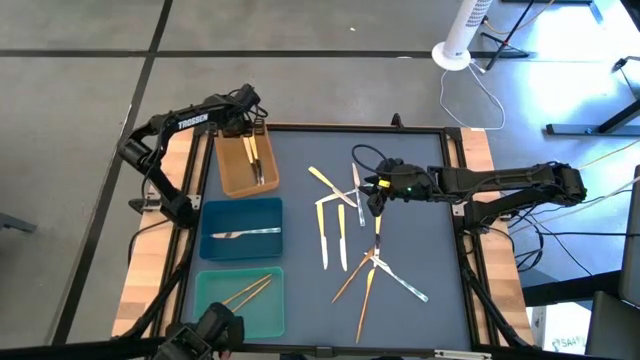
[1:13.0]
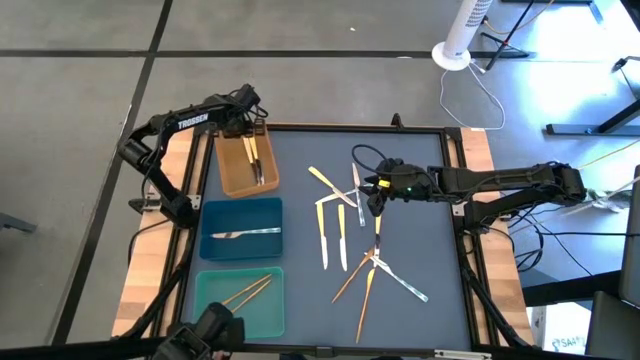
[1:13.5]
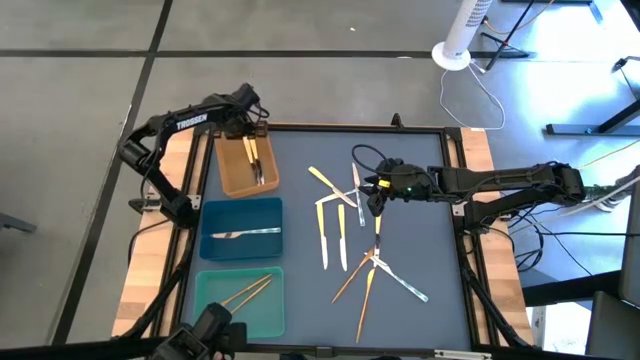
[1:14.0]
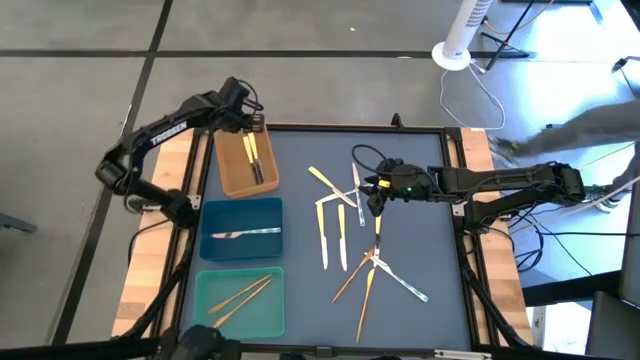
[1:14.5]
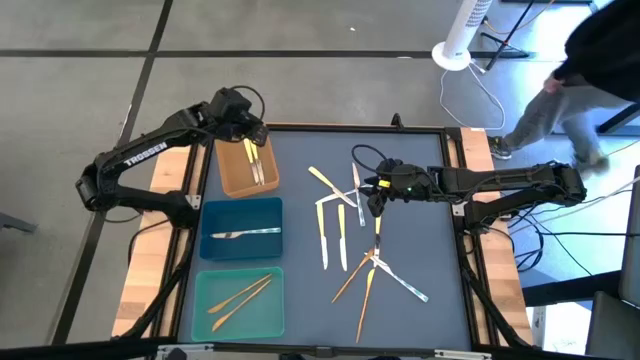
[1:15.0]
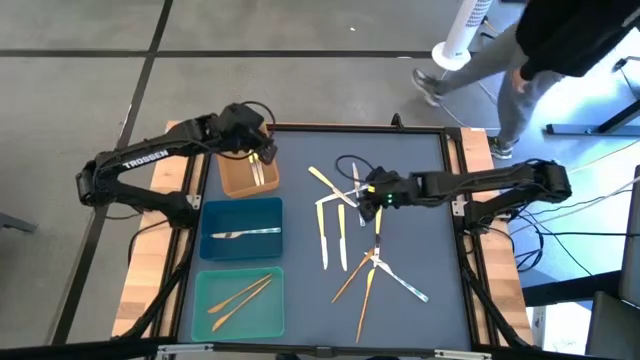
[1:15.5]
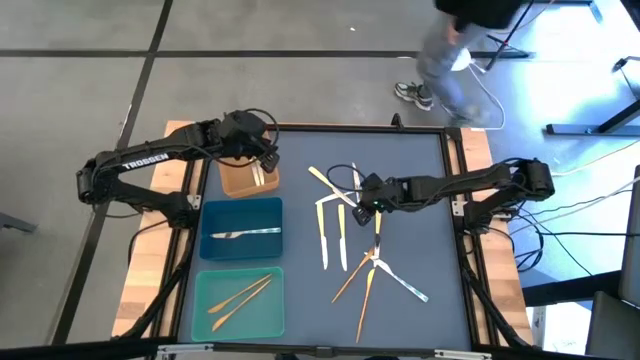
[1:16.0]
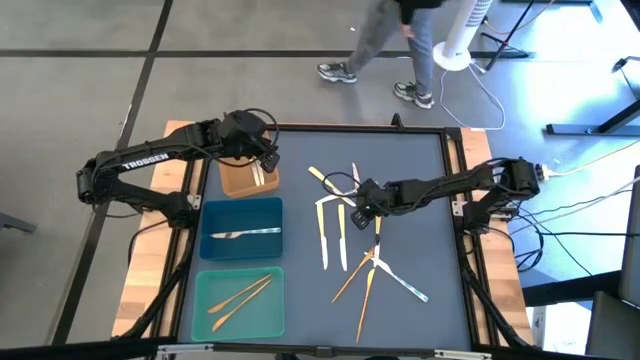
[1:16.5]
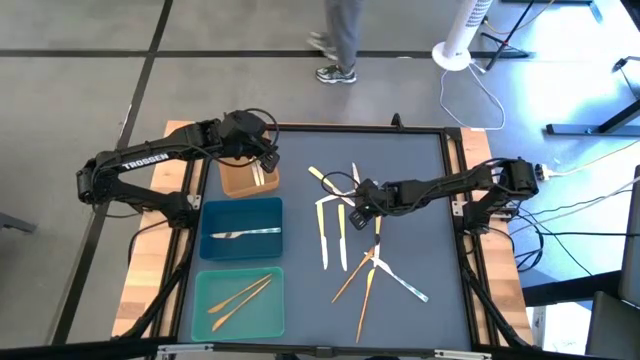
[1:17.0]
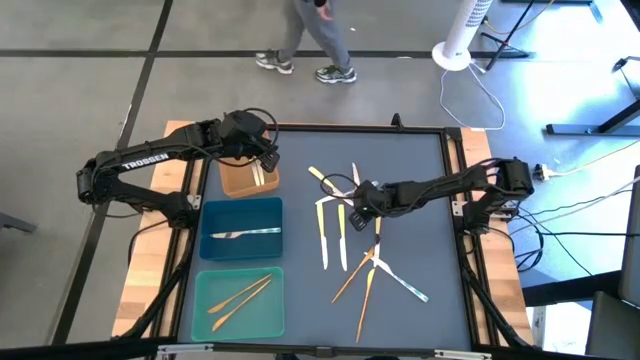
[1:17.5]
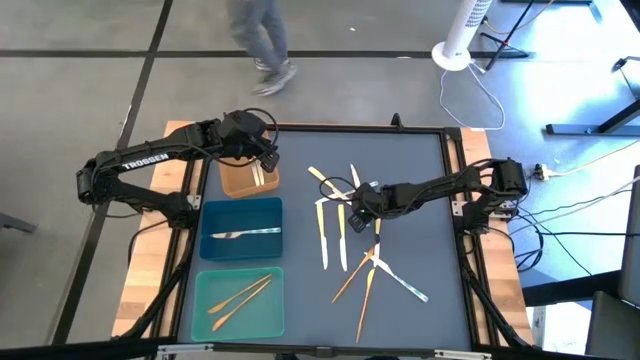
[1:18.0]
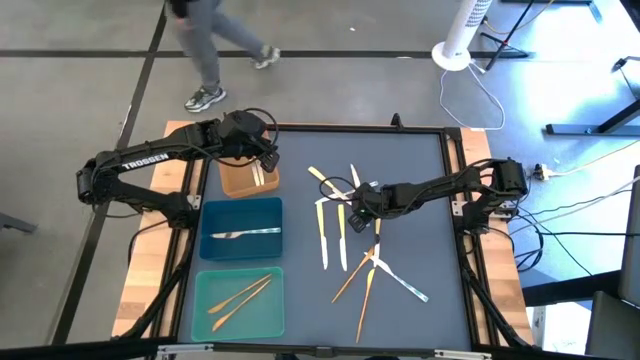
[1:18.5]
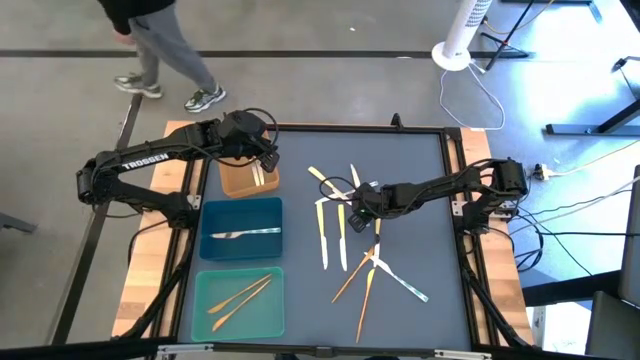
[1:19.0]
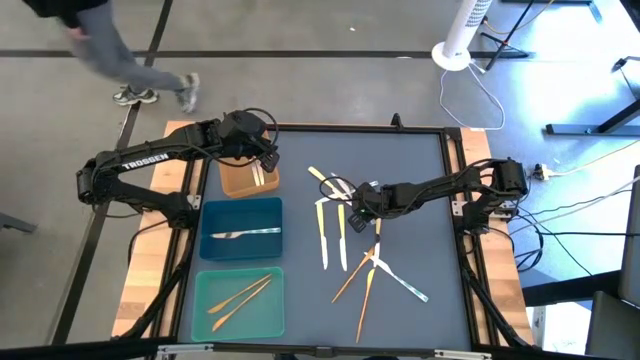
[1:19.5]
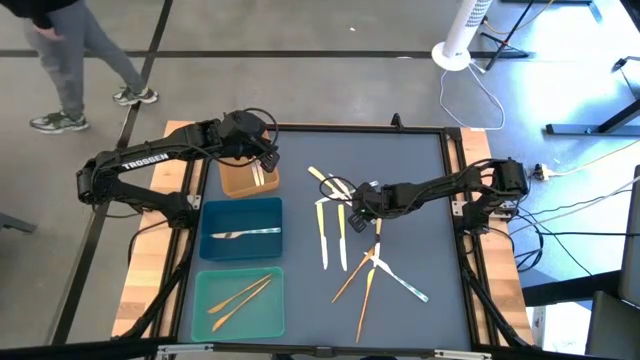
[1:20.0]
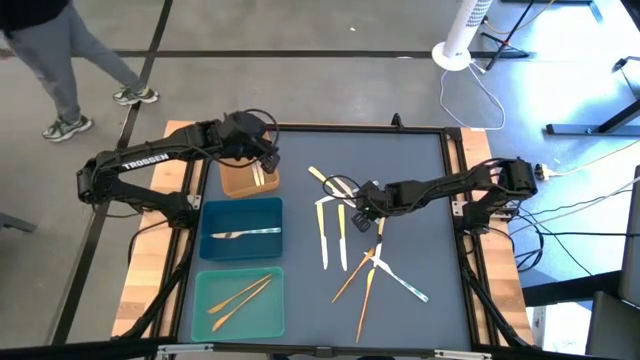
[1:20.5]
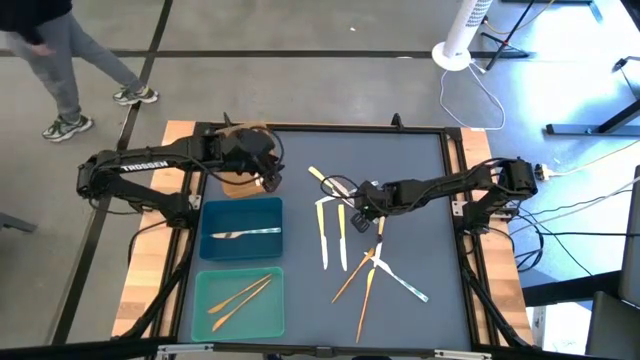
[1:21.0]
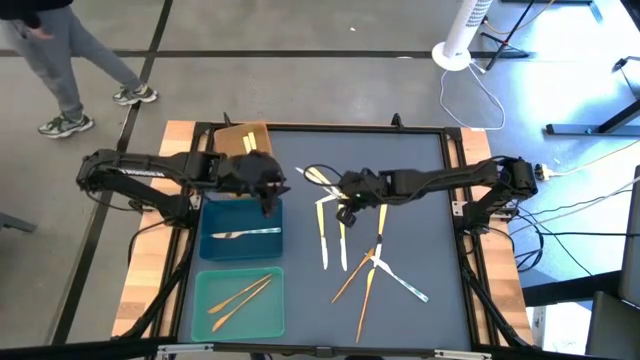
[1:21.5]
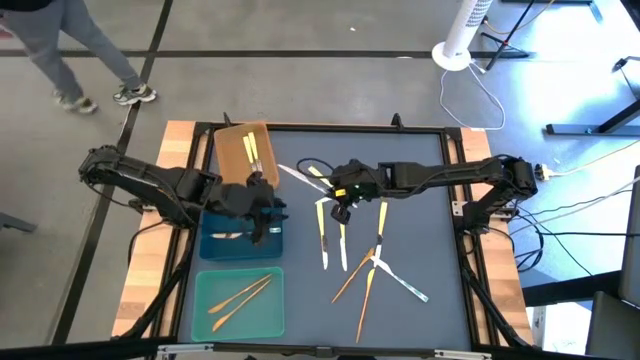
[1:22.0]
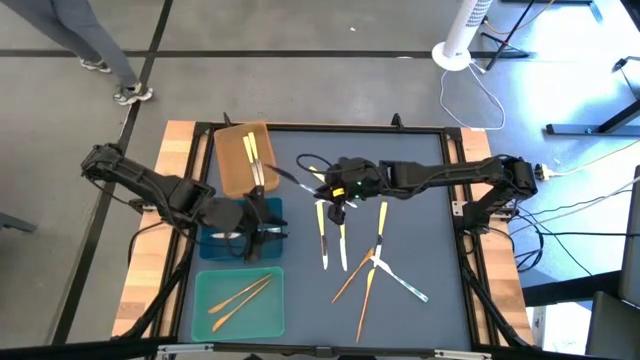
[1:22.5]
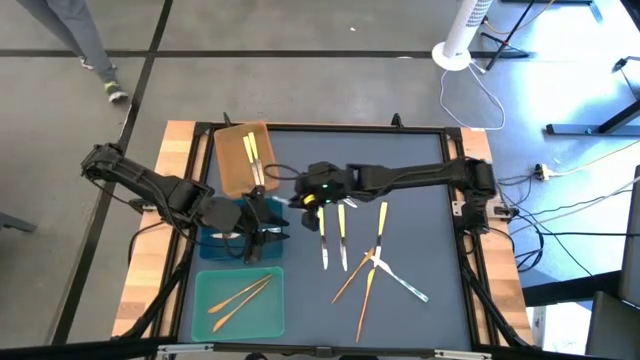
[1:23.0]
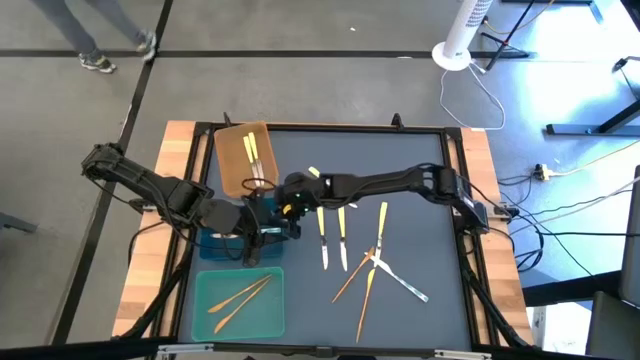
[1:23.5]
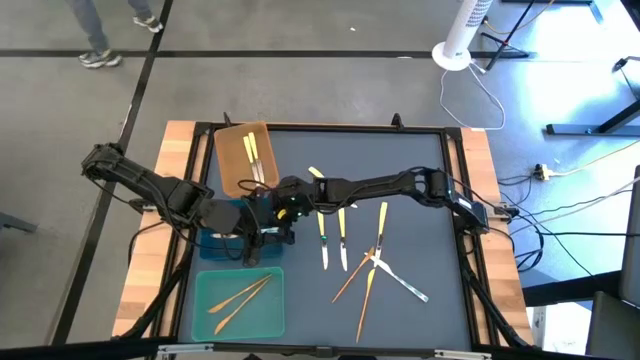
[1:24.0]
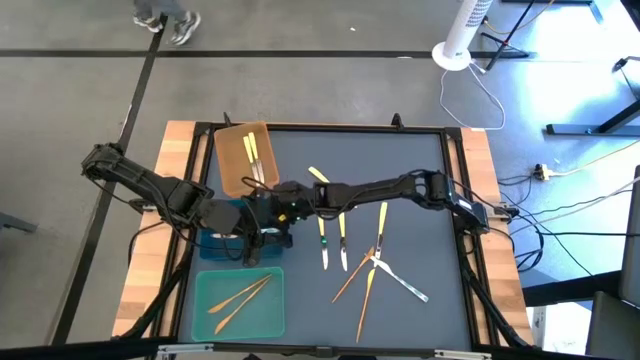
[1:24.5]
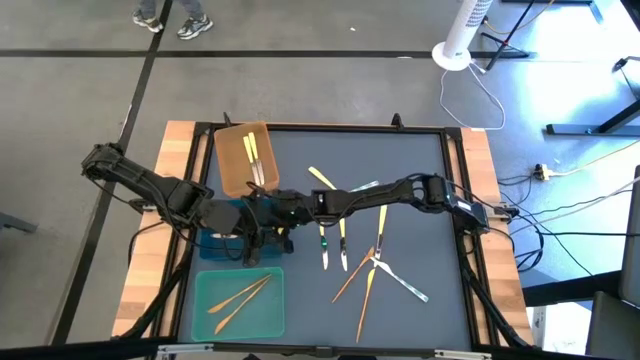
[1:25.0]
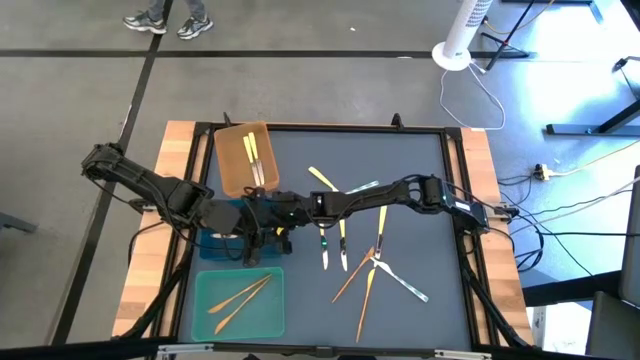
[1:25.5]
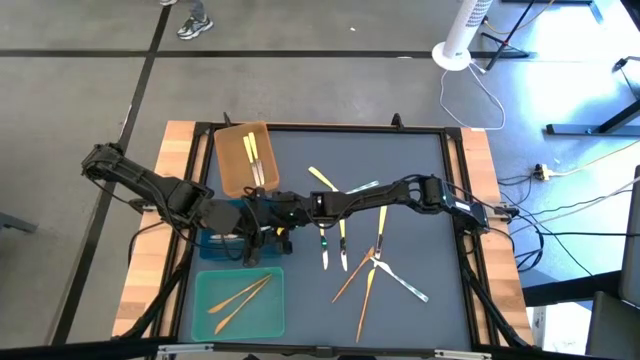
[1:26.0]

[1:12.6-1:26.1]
Task: Sort silverware by color (type)
Put the white-green knife into the blue bin

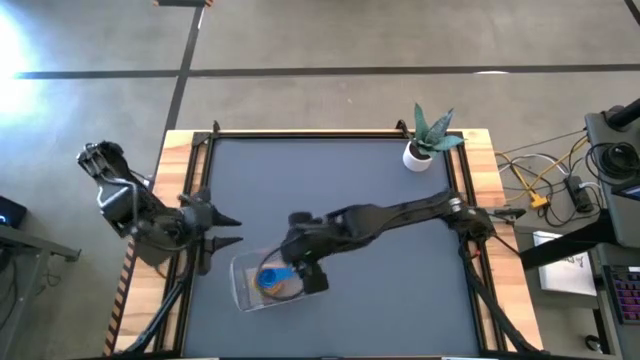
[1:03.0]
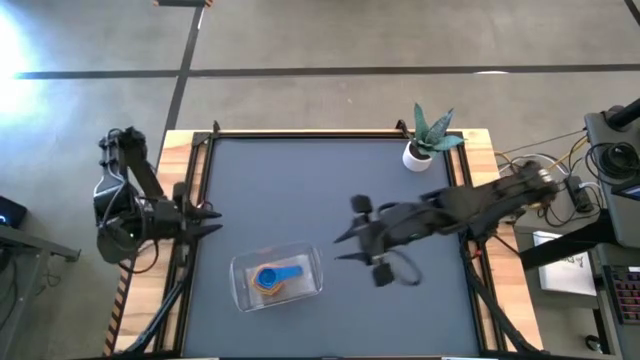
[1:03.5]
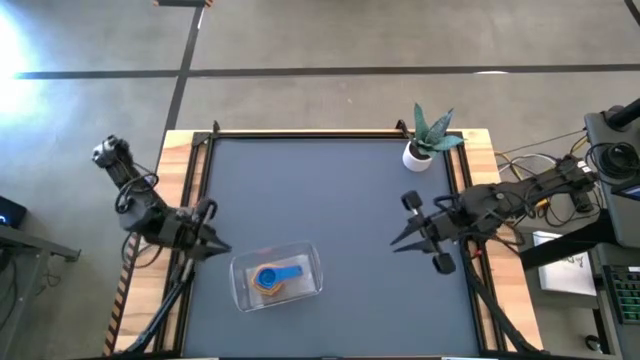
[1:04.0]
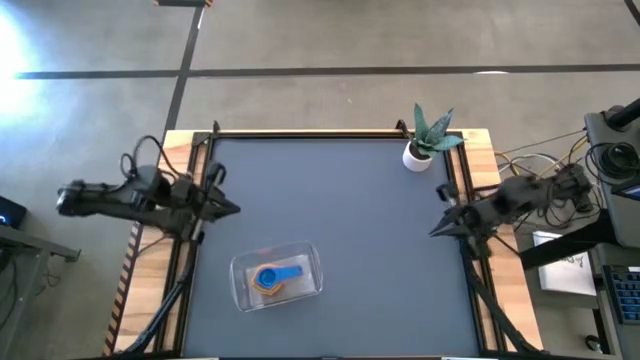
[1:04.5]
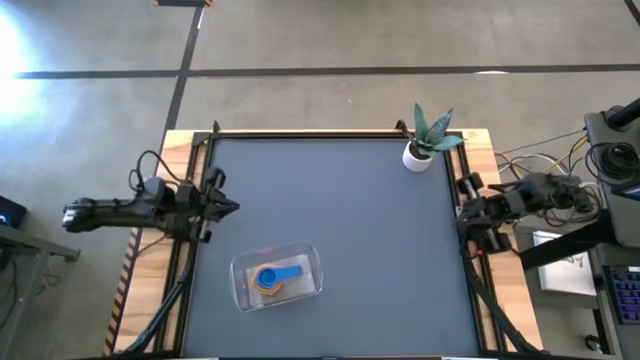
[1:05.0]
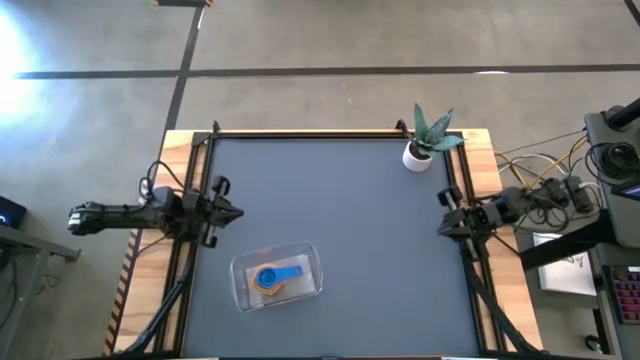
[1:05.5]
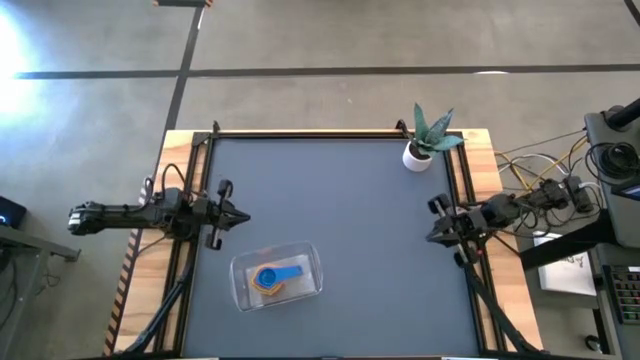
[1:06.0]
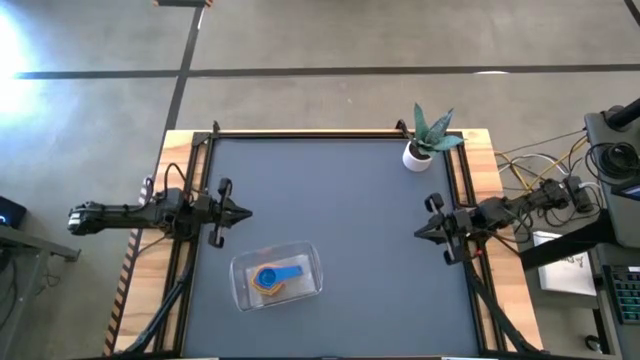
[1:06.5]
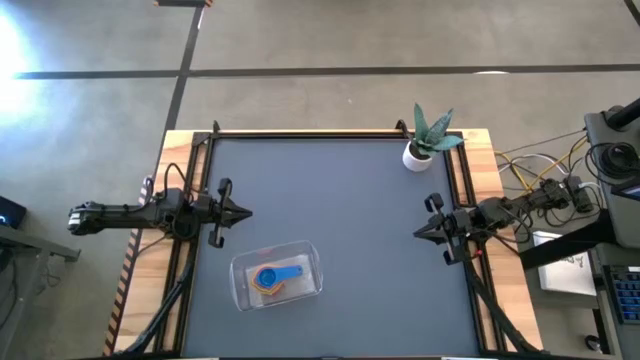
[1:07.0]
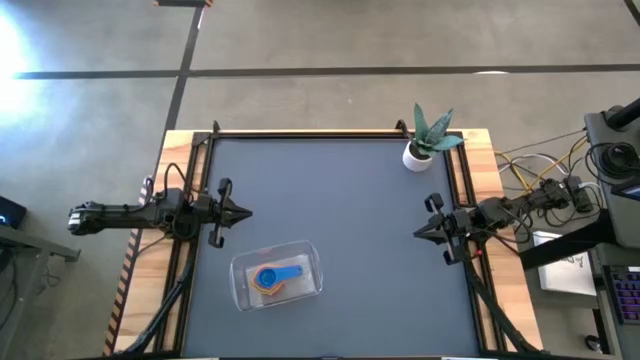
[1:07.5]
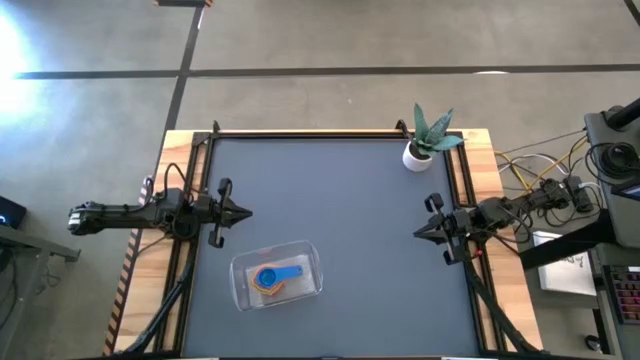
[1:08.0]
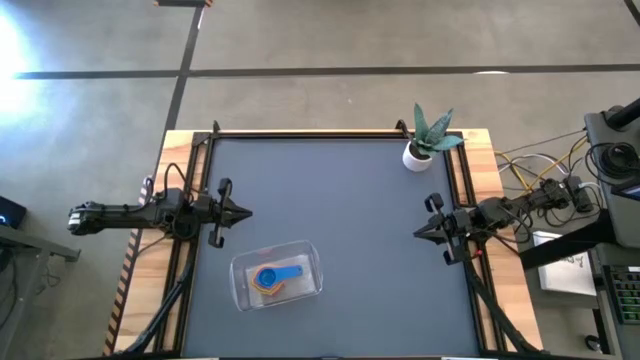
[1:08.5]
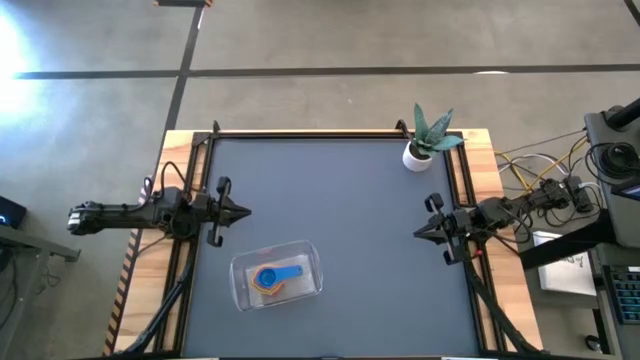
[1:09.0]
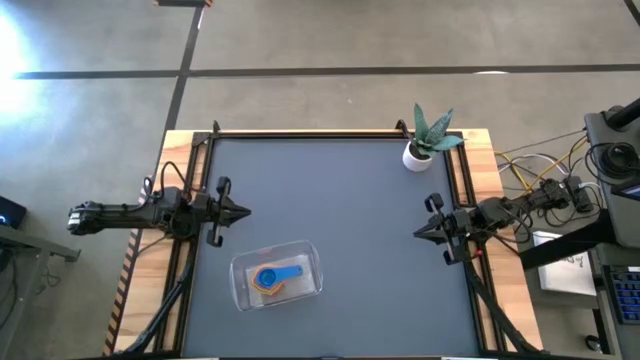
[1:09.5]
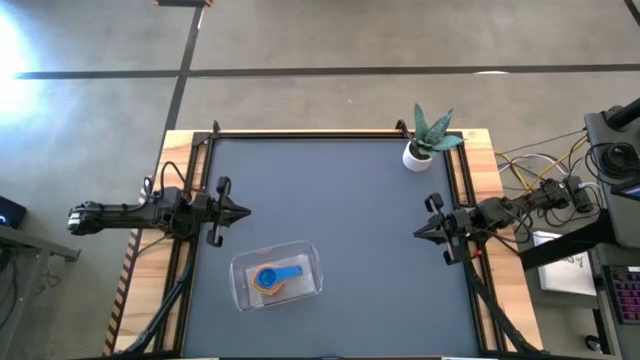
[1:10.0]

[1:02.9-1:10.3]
Task: Nest measuring cups in basket
Return to Home Position
